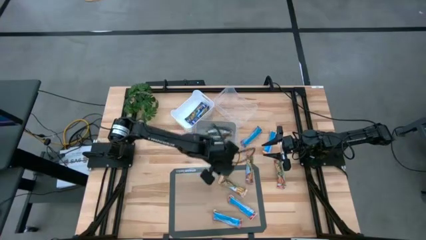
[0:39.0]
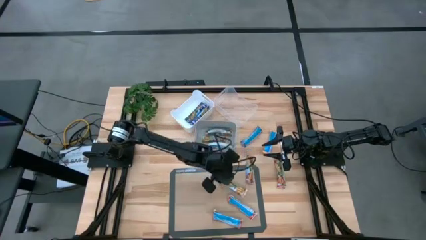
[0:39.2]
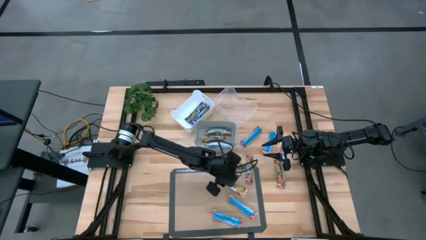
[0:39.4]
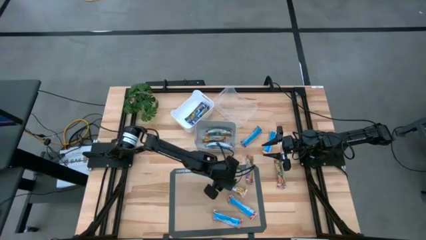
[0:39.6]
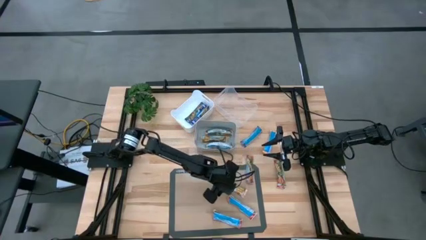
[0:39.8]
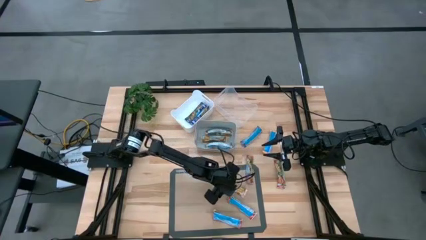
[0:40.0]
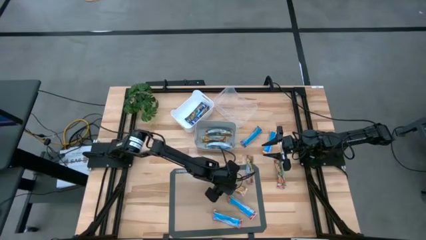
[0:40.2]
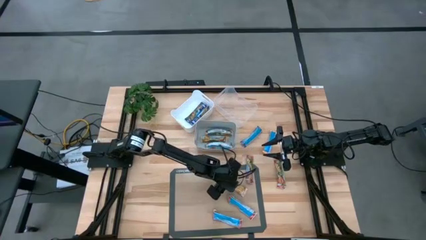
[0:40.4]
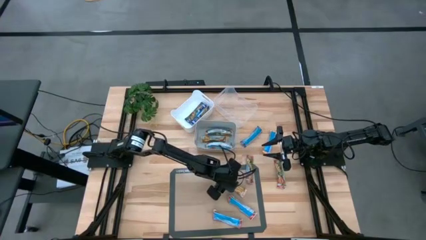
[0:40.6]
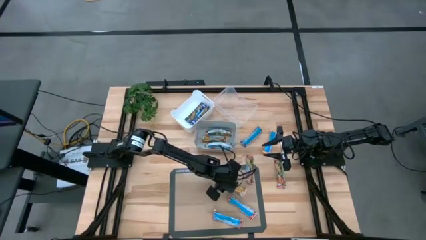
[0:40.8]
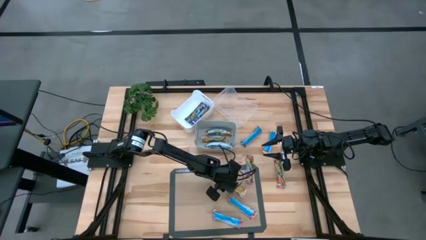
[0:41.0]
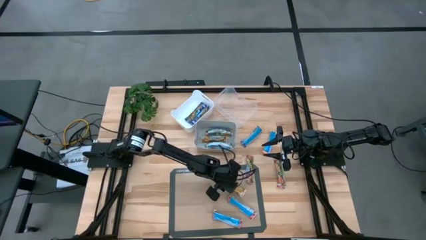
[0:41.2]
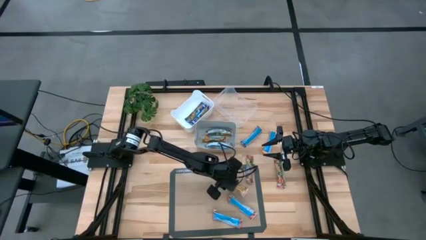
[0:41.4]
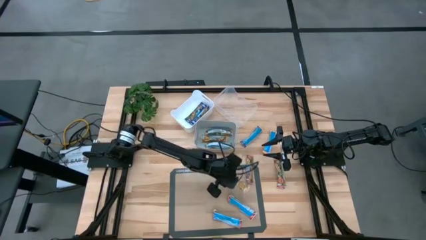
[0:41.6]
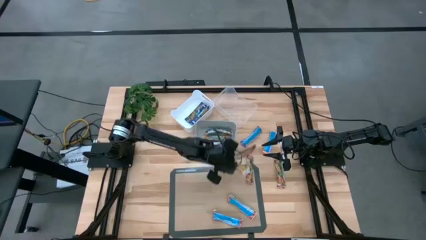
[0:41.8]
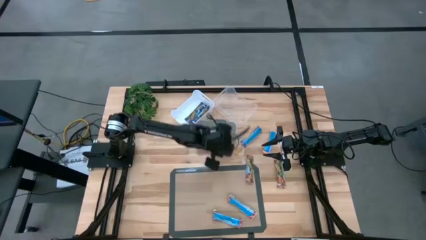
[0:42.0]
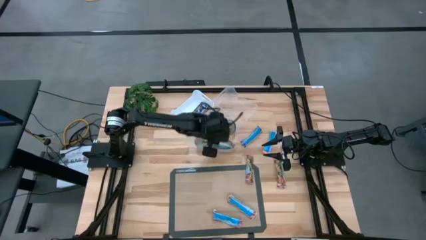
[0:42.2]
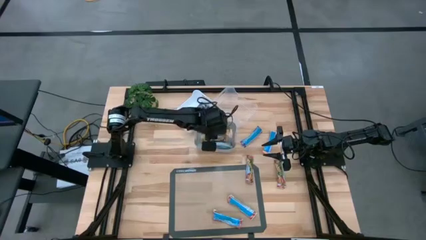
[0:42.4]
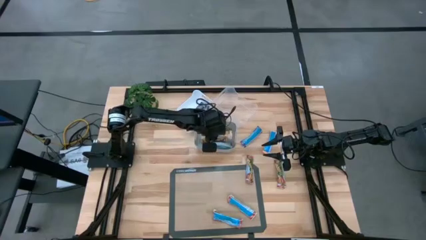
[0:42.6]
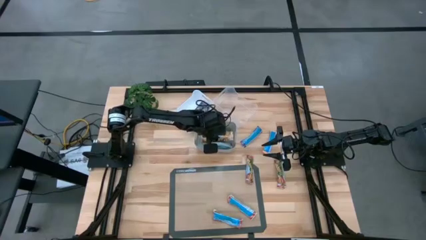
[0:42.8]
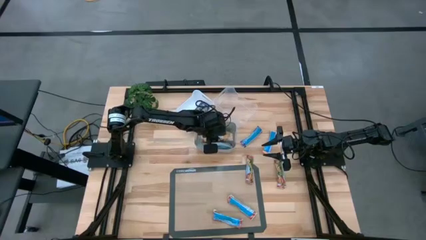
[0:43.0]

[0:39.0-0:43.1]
Task: Pick and place Granola Bars by type
Put the yellow granola bar into the gray bin

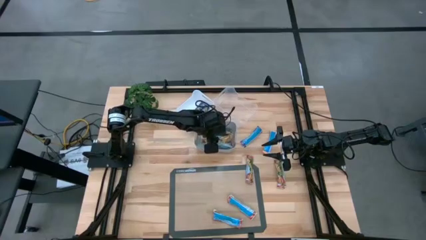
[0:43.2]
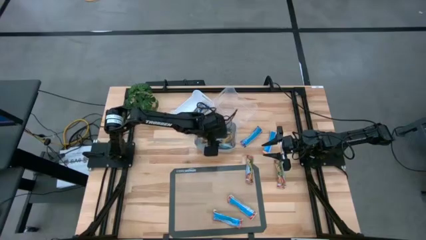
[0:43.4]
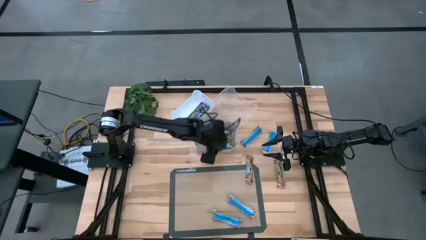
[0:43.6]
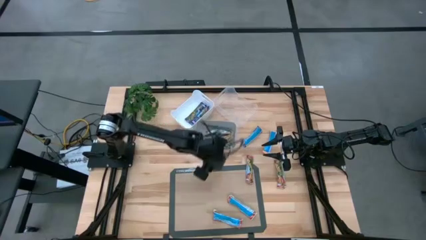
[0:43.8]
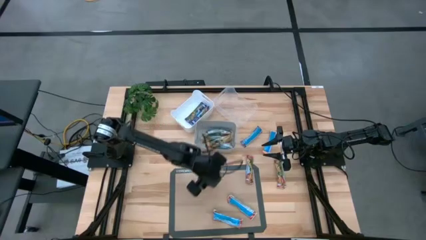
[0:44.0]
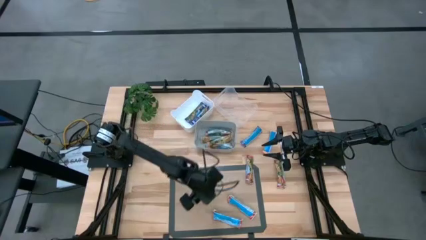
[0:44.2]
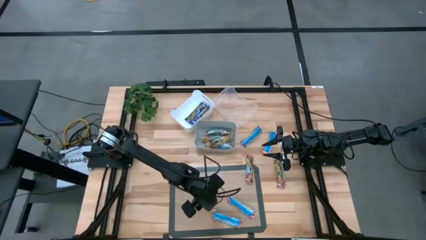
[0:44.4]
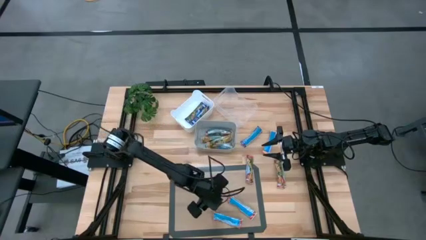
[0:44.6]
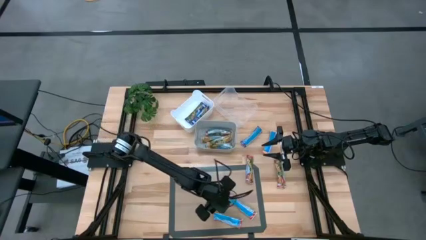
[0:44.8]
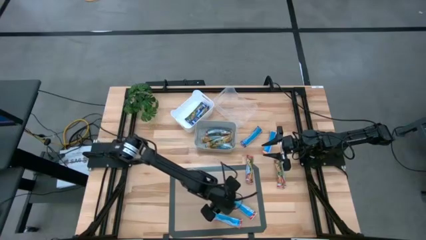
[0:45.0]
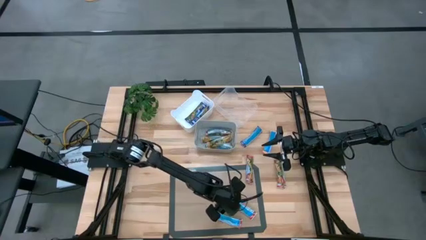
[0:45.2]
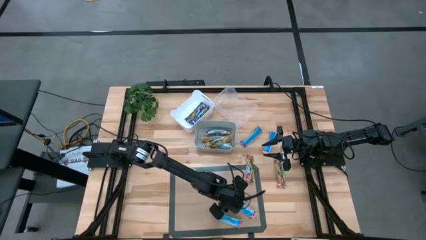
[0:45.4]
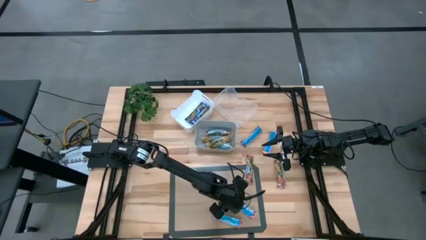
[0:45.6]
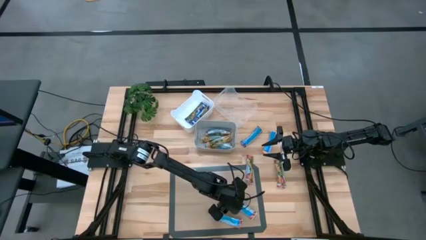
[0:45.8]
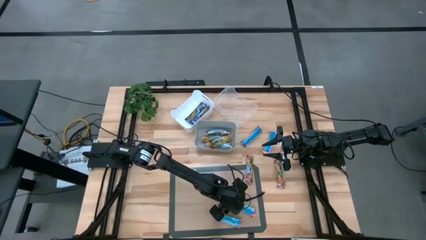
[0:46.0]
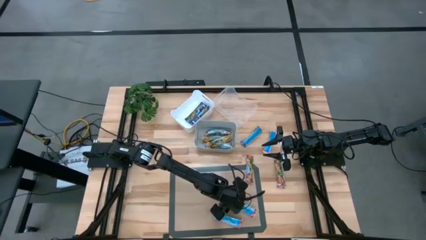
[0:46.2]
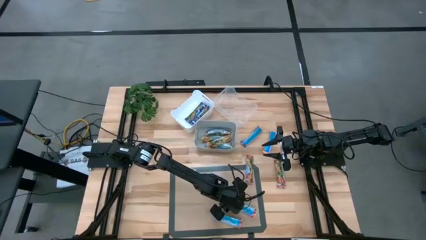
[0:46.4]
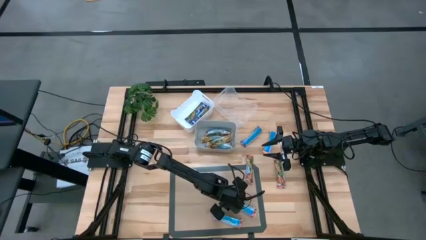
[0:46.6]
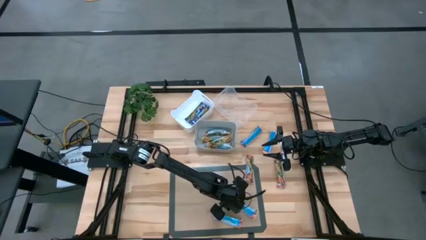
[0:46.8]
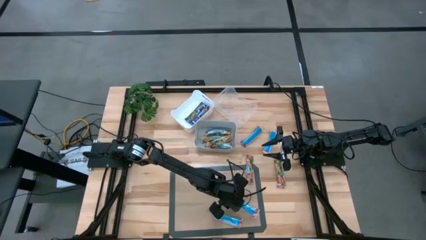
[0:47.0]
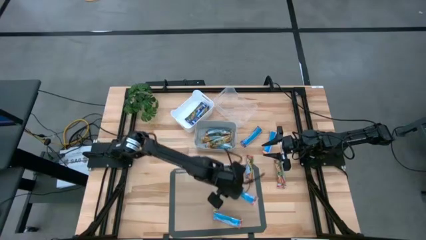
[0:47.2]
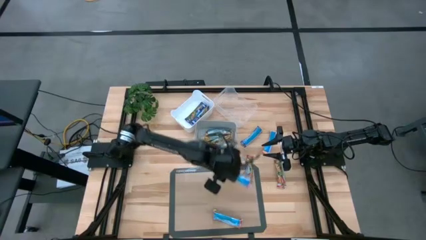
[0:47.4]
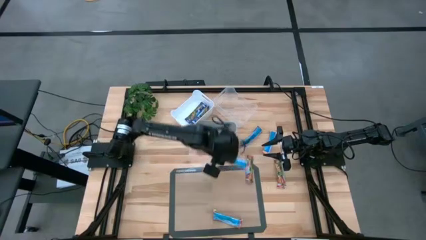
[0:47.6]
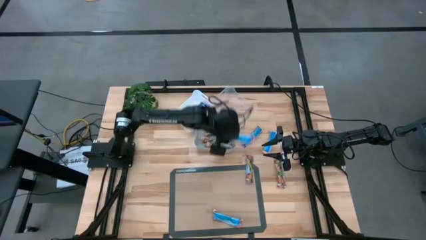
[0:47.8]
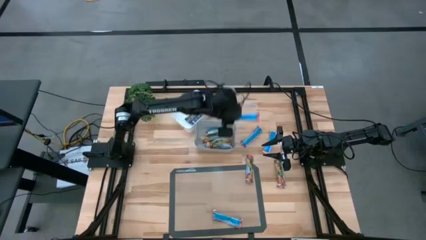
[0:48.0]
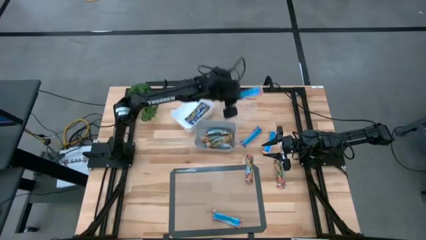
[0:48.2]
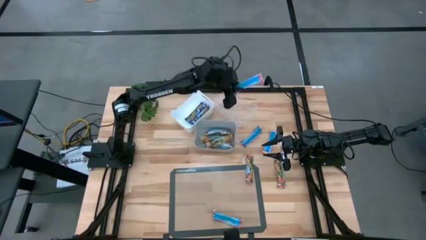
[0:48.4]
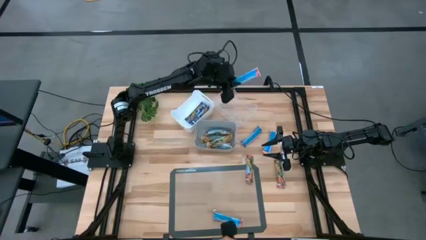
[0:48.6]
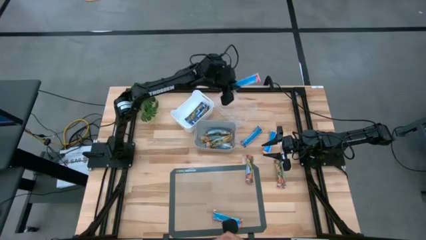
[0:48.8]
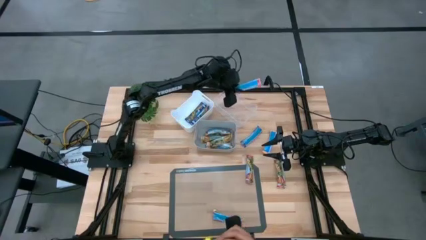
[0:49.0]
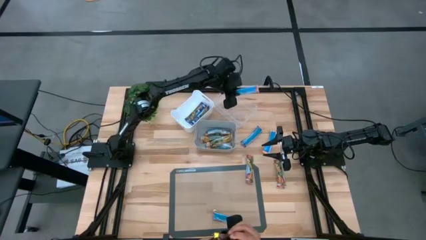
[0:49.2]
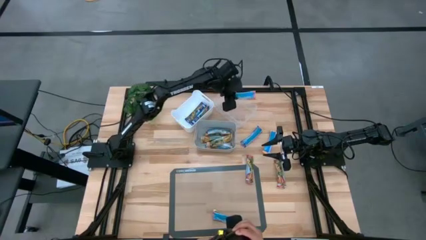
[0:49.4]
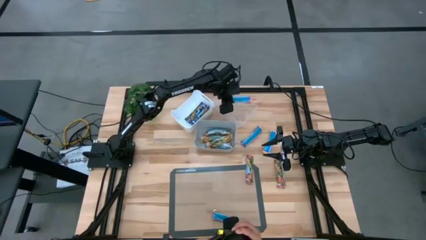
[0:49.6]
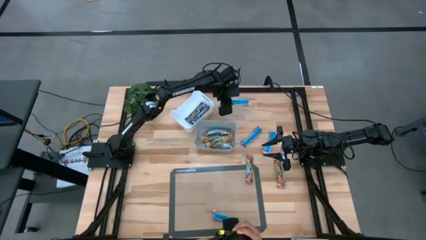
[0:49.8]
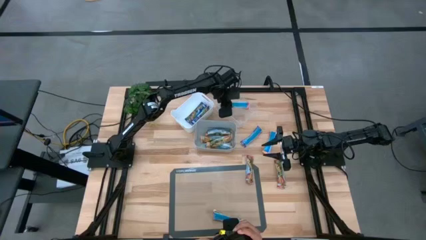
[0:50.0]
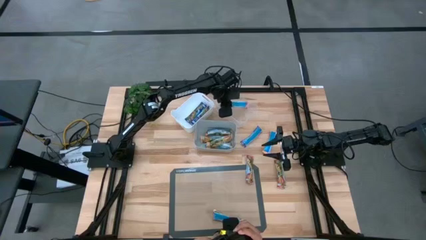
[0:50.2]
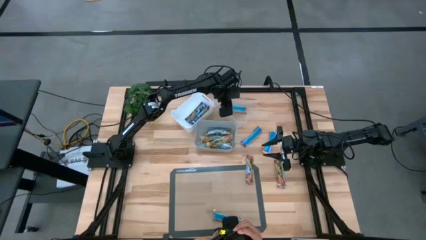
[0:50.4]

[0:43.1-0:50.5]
Put the red granola bar into the transparent bin

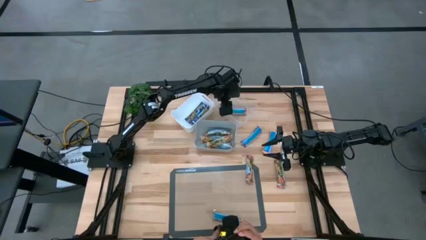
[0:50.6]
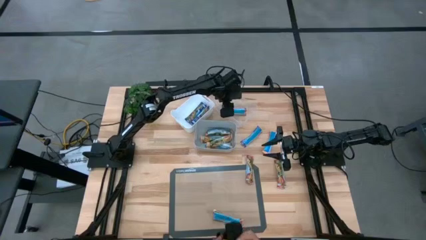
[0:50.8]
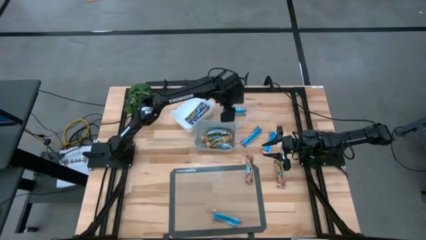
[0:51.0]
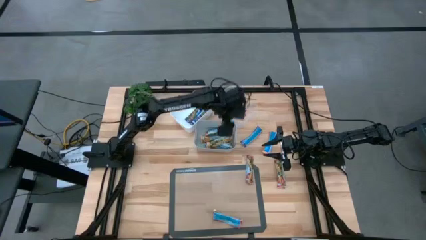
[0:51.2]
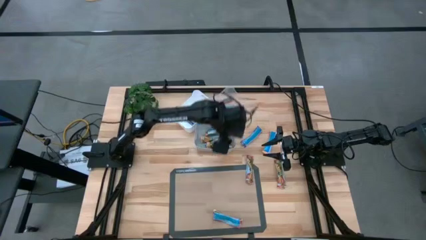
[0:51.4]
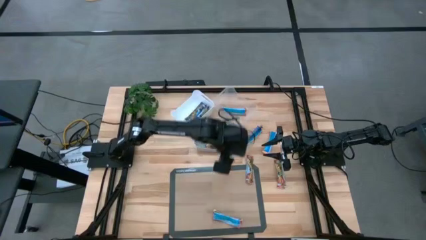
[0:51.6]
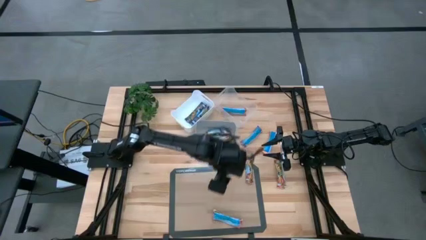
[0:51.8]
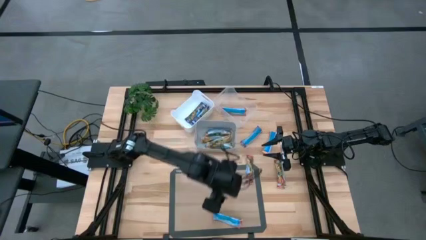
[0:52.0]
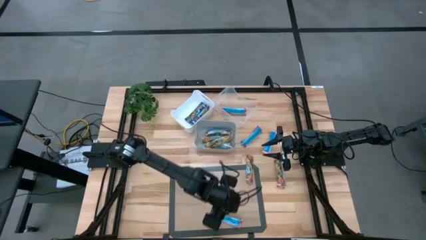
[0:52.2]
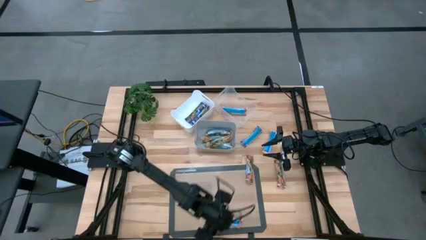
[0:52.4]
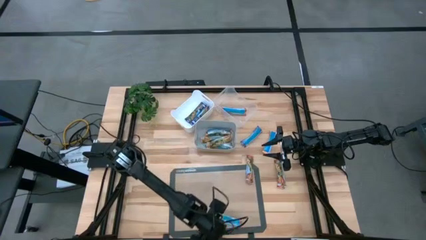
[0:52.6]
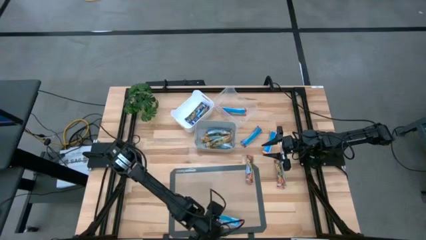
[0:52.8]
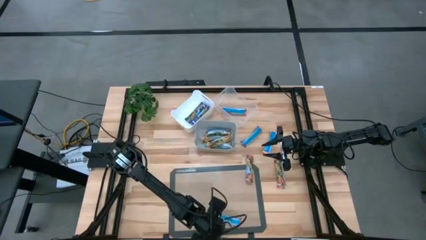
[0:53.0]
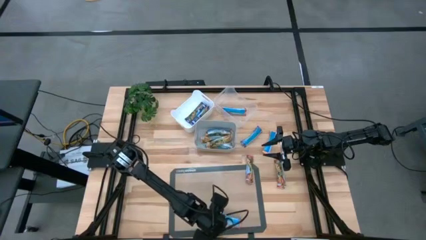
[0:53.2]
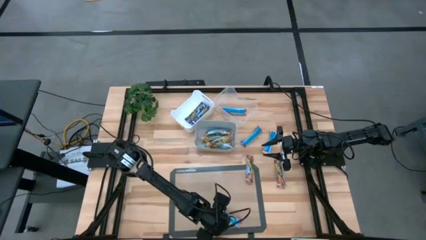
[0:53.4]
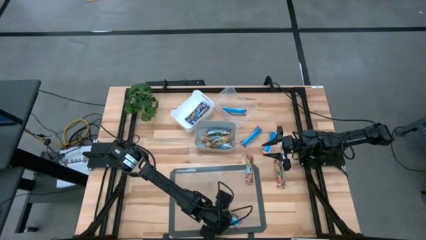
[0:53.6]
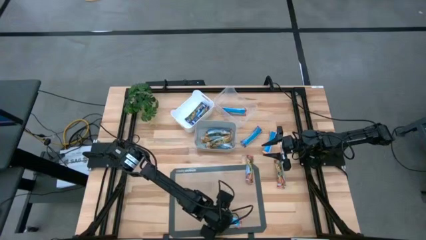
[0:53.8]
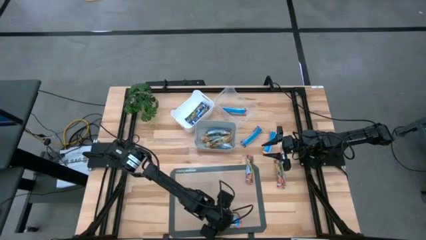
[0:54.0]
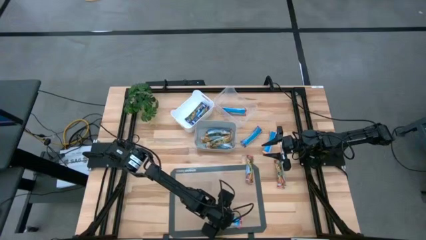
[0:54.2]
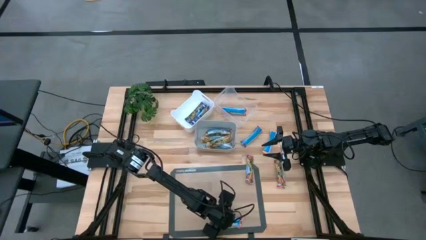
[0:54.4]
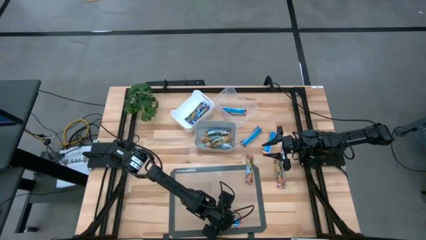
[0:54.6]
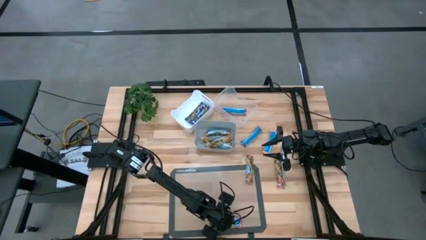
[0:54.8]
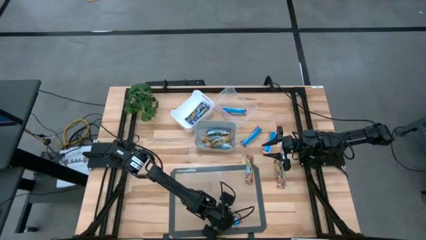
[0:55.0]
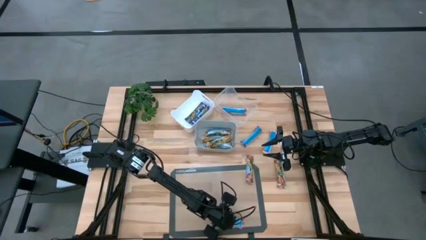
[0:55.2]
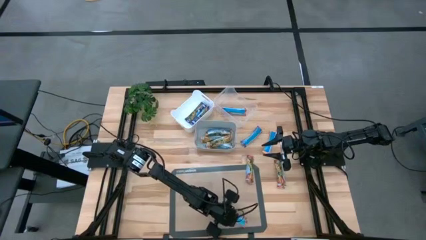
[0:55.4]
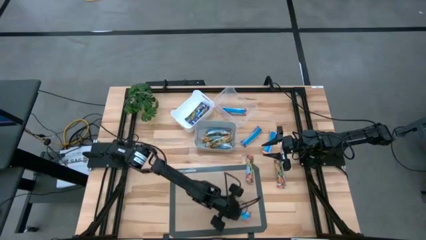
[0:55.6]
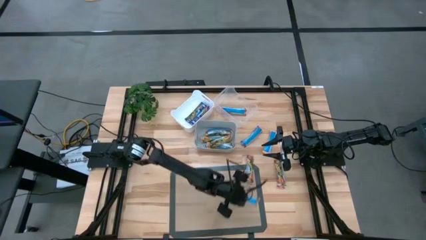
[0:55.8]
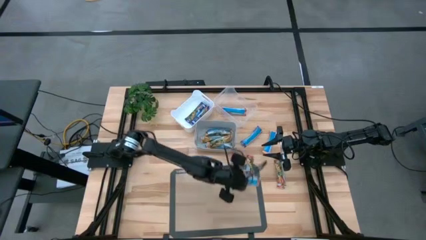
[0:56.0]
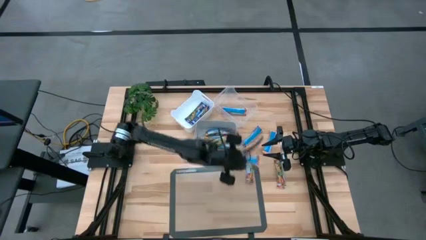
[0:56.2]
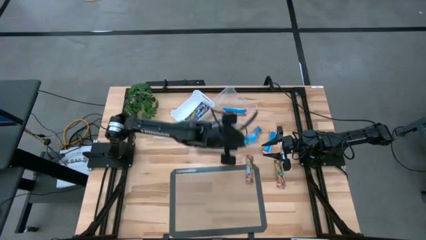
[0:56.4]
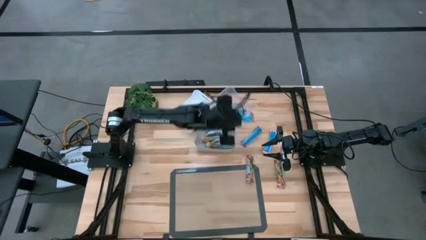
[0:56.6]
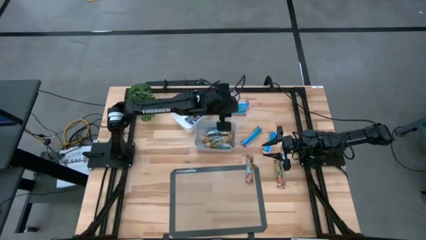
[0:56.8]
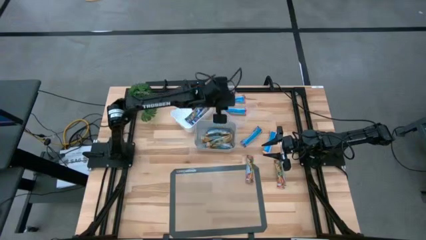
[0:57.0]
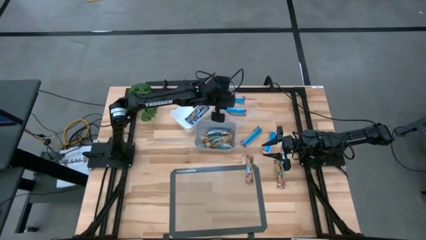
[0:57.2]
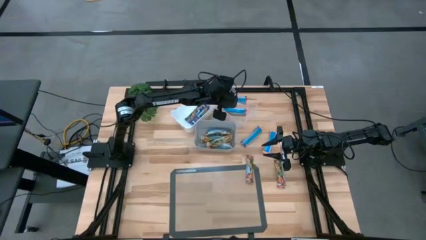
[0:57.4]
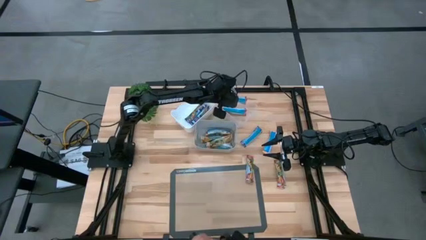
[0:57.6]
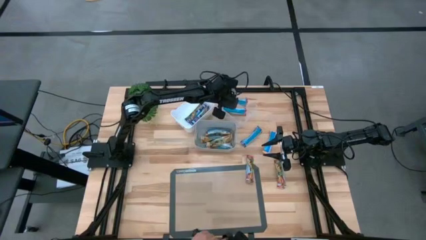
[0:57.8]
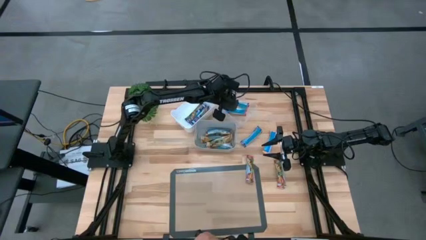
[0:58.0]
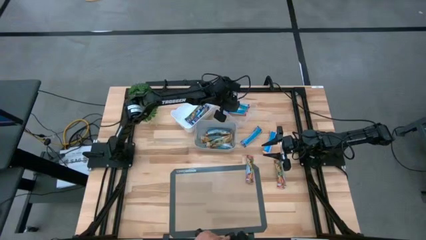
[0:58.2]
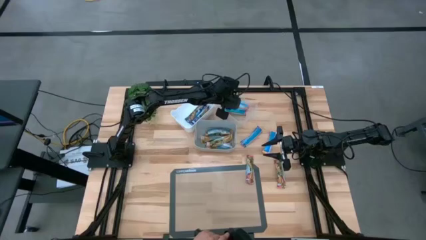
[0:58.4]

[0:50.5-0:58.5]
Put the red granola bar into the transparent bin
